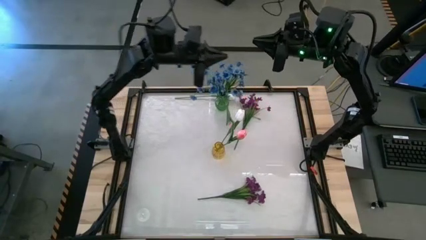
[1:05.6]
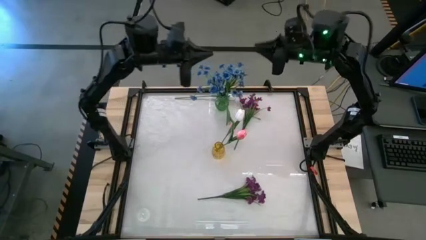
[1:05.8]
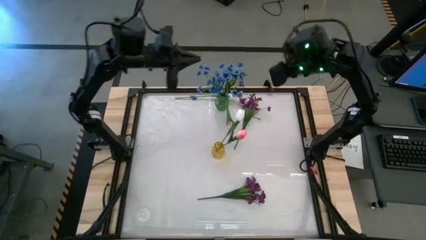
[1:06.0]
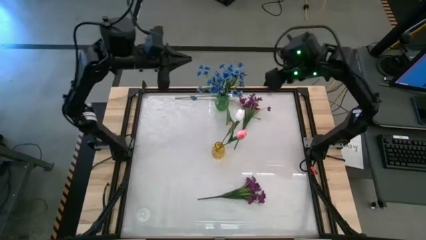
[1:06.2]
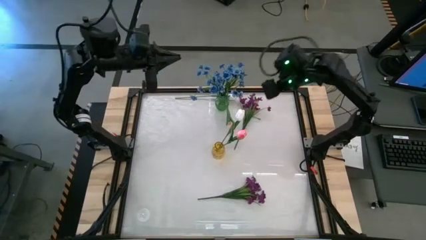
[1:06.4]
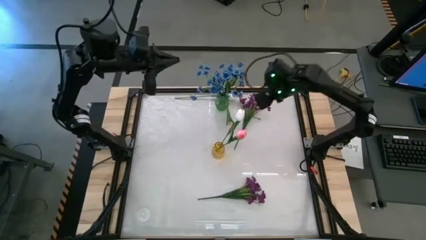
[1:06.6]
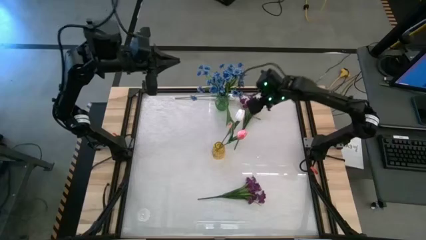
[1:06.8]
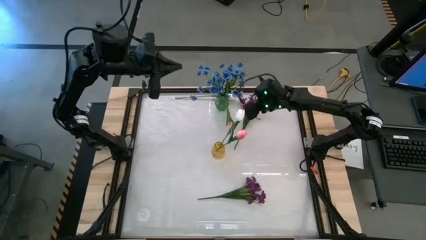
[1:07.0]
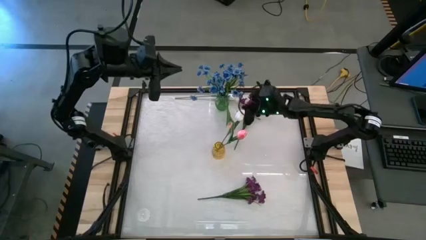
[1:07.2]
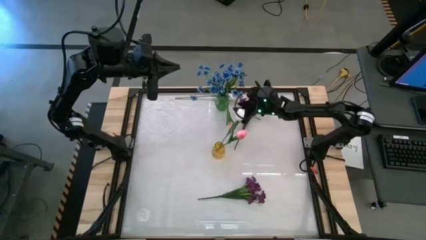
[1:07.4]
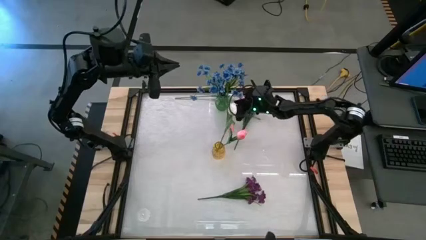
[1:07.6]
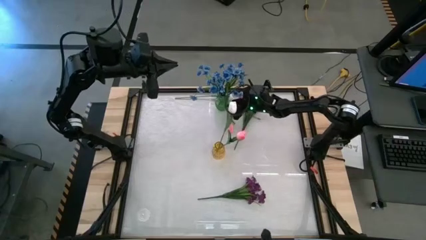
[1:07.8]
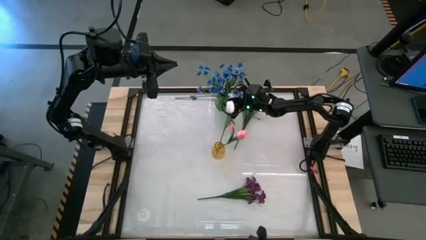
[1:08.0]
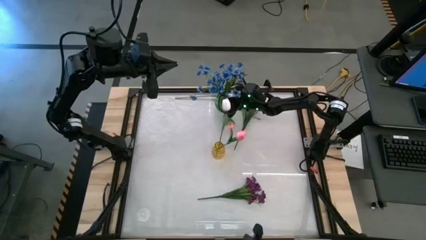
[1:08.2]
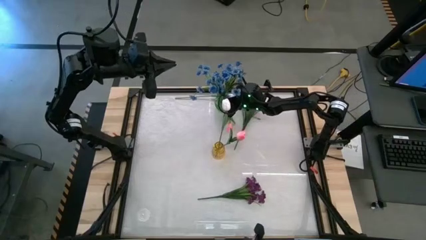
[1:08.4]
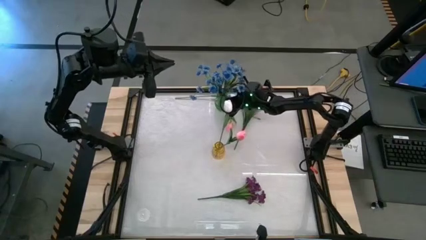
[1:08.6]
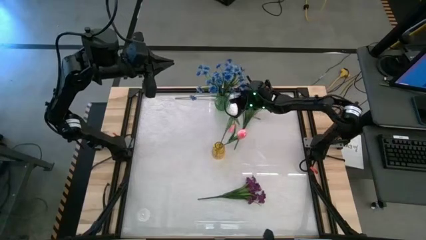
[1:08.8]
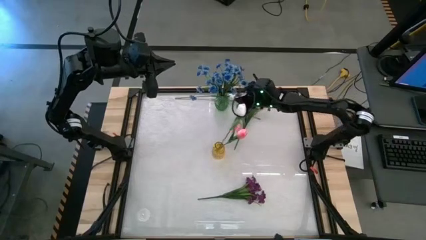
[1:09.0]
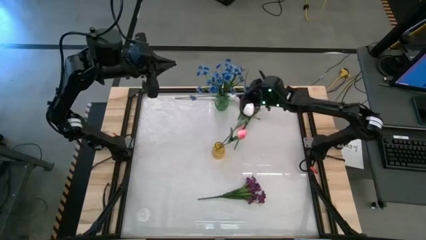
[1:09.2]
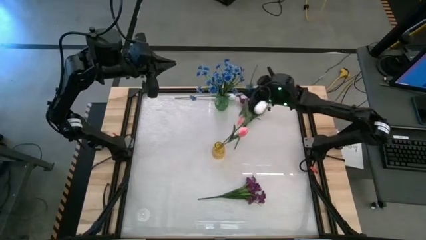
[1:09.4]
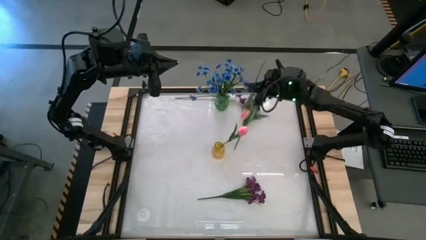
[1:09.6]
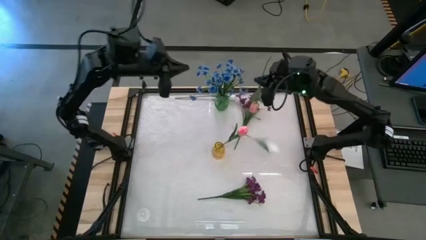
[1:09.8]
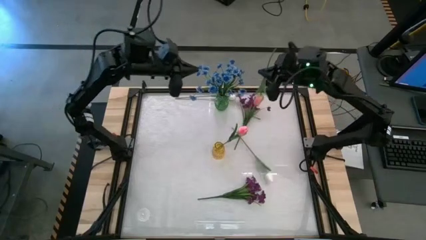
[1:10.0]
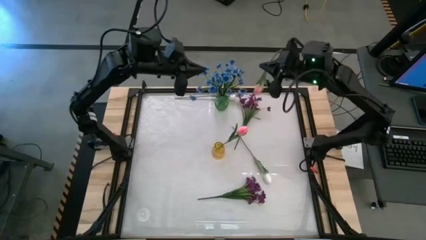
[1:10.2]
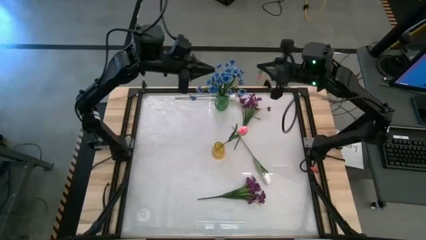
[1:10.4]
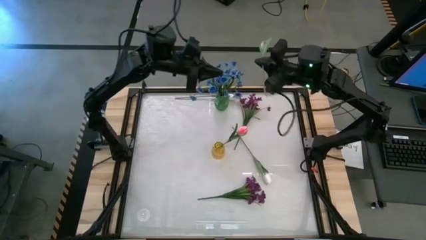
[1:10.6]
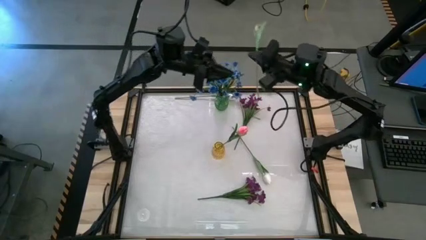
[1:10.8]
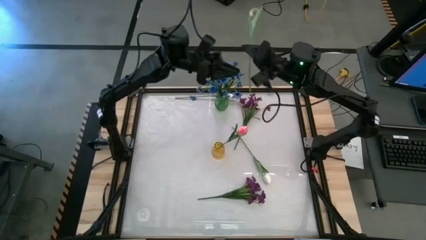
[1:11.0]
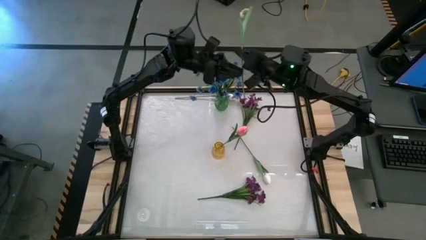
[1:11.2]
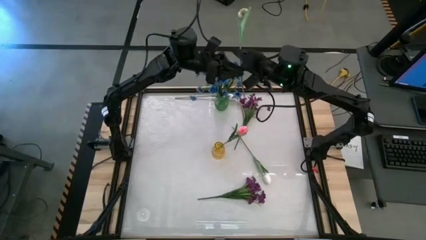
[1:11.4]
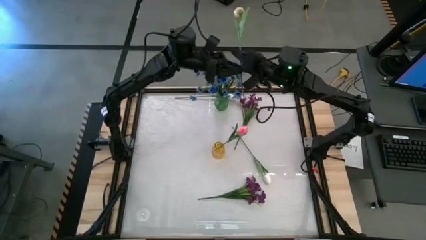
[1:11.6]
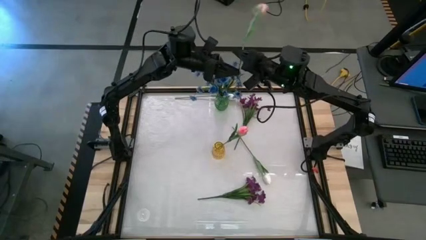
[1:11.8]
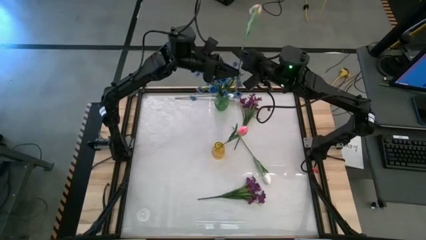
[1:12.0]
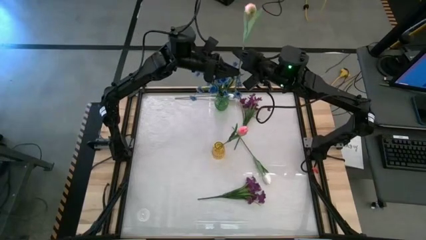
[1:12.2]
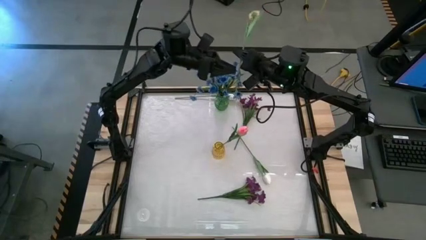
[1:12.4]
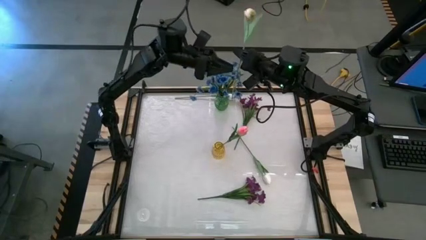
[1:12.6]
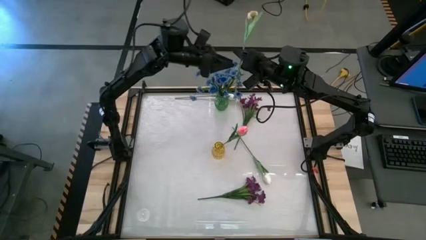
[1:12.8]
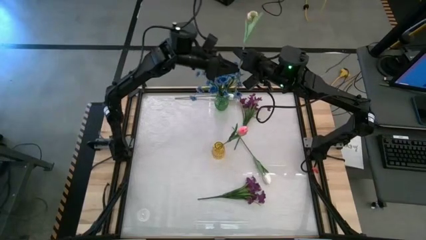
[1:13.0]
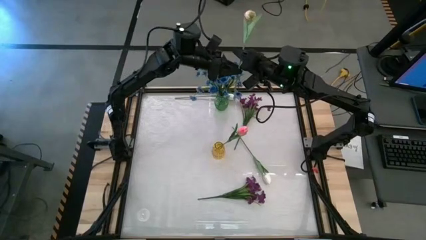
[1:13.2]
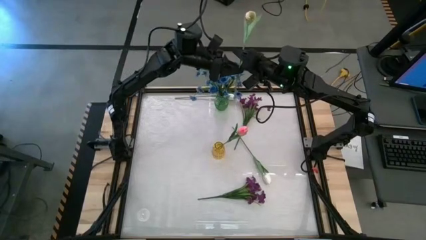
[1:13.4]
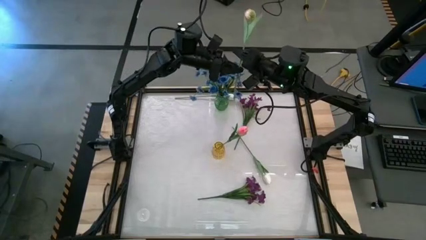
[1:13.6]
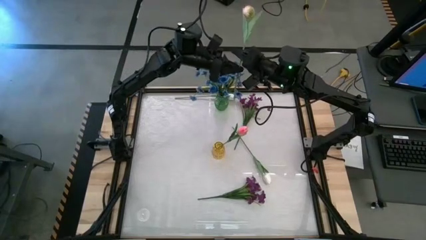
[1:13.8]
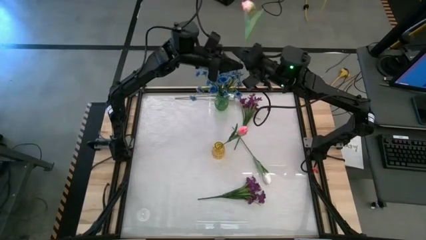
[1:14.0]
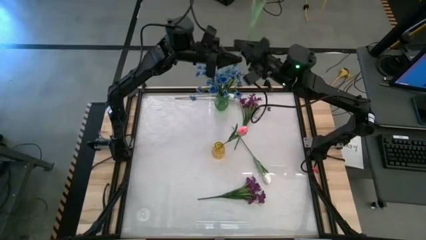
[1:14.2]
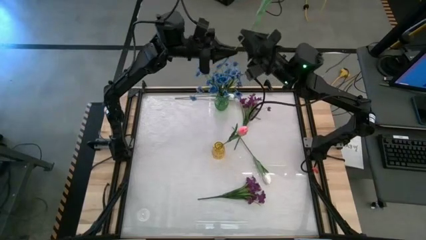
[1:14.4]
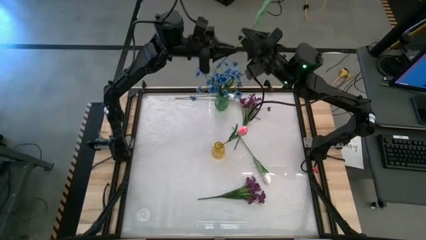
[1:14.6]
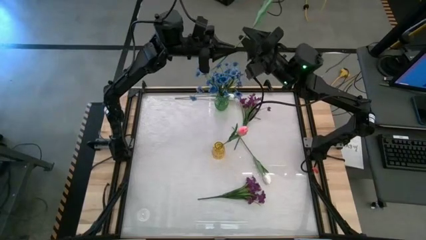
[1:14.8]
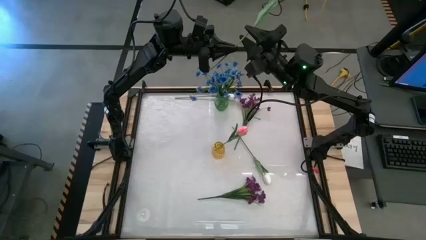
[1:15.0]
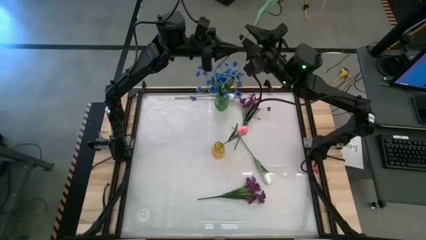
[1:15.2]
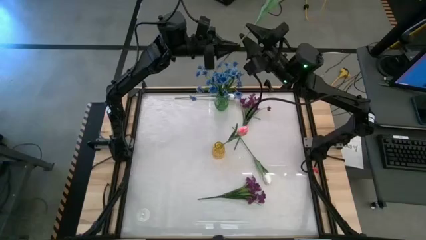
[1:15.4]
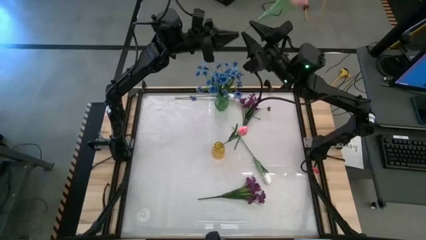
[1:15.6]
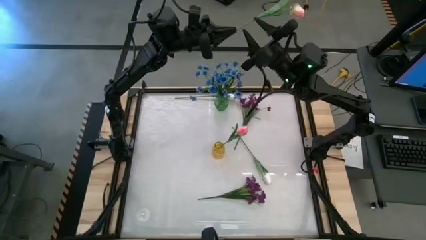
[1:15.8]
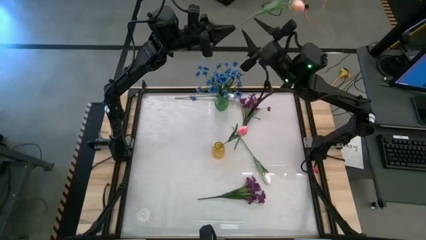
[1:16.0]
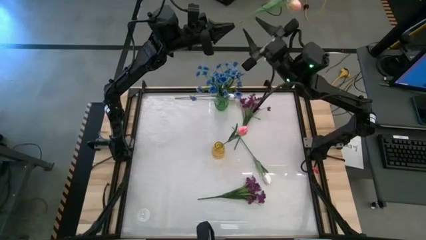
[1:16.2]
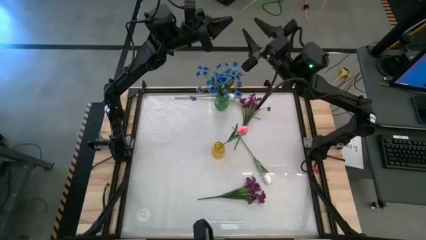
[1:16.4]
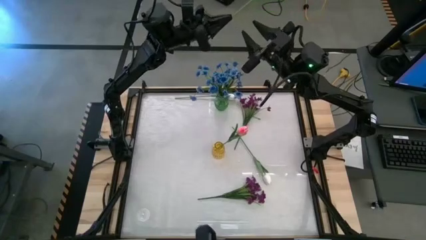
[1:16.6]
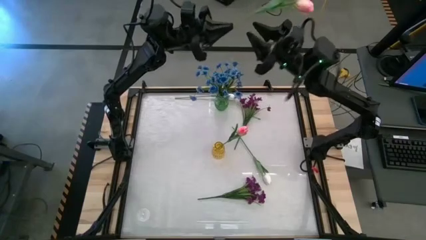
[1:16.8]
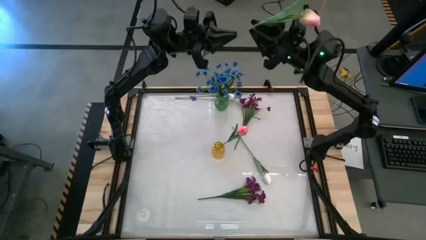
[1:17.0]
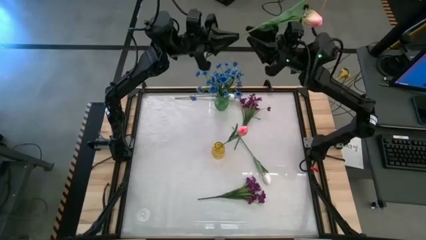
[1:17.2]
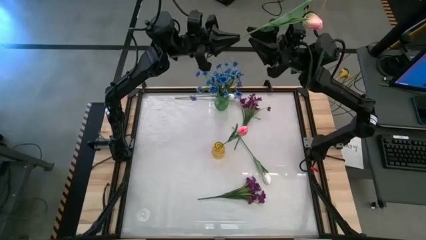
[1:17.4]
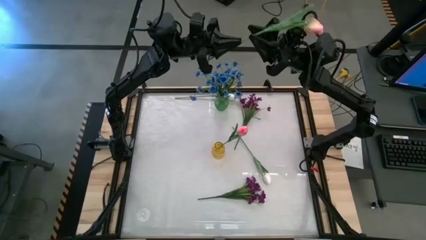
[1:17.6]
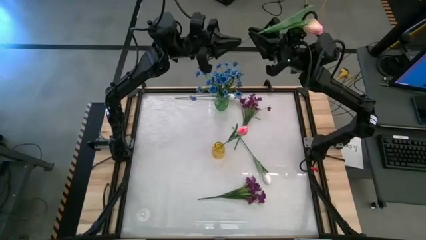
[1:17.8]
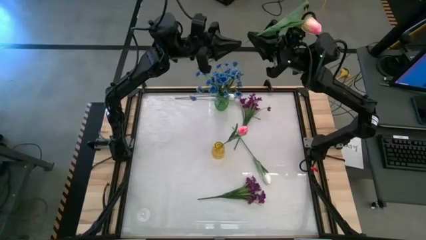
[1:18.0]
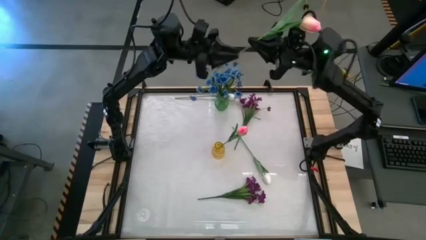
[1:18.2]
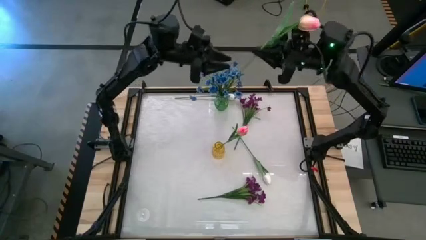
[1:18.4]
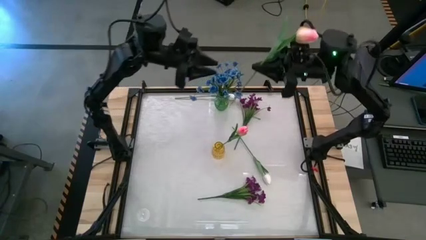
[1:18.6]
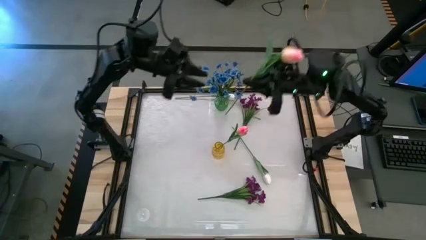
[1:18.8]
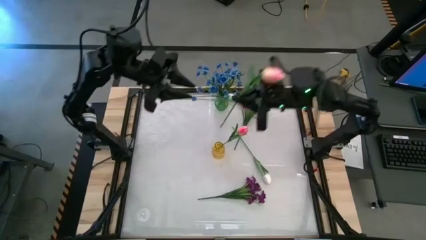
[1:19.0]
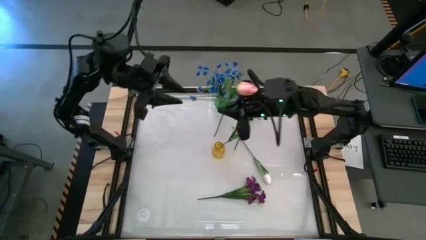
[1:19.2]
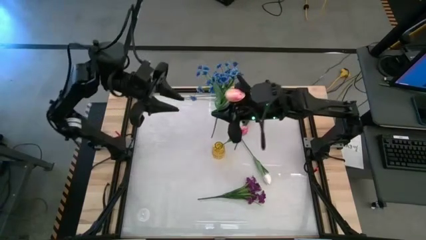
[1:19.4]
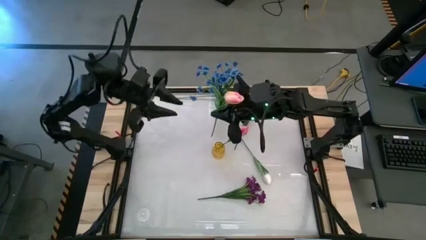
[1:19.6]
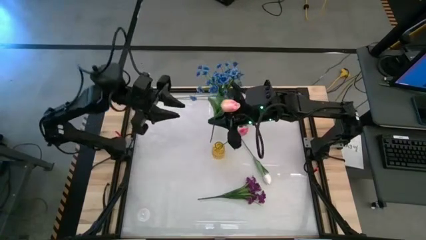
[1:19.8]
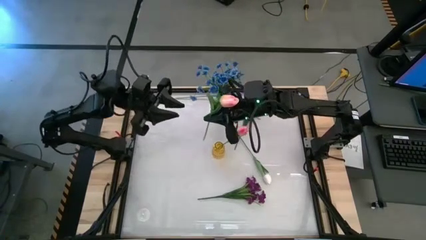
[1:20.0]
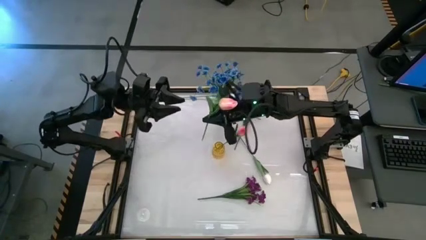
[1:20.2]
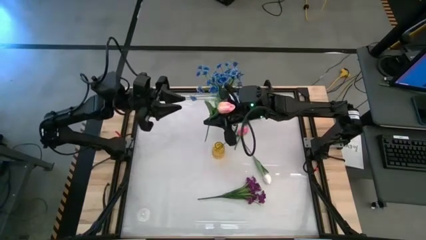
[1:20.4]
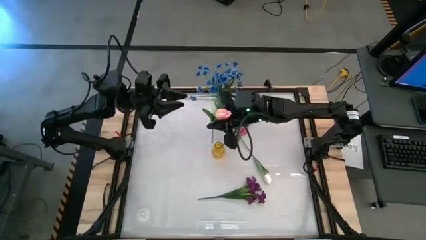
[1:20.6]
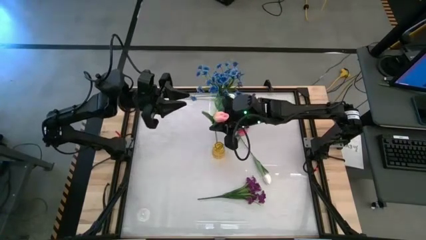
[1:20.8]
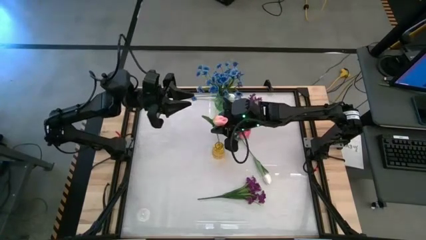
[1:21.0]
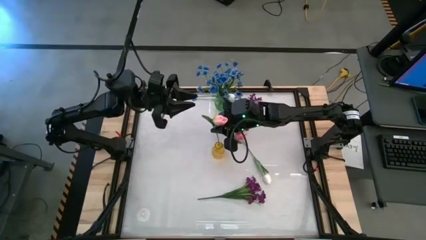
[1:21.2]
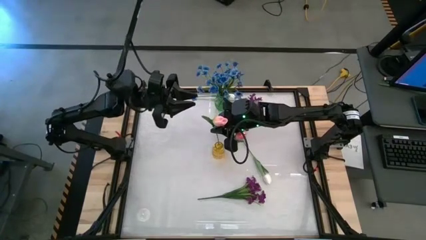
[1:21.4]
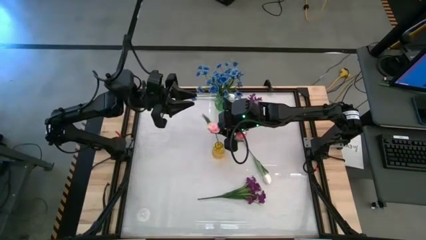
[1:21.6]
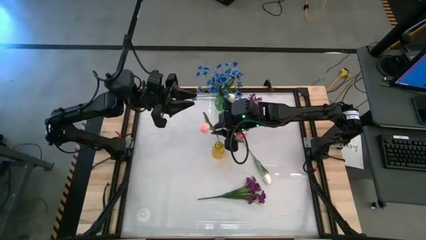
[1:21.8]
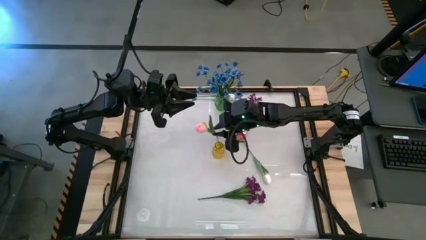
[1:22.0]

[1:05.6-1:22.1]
Task: Sort flowers into vase by color
Put the pink flower into the yellow vase
